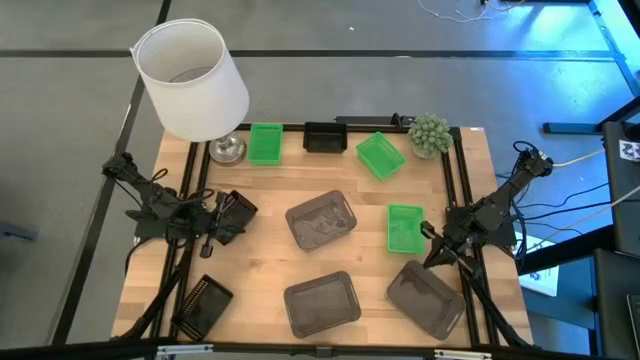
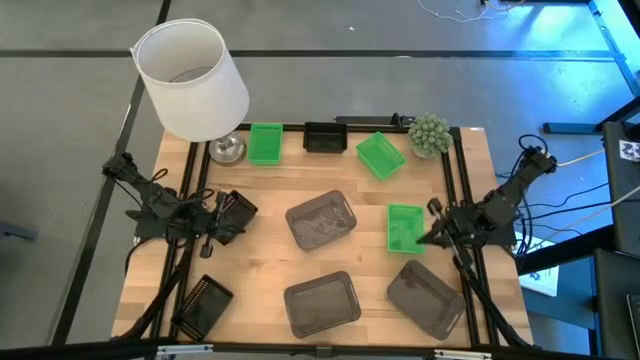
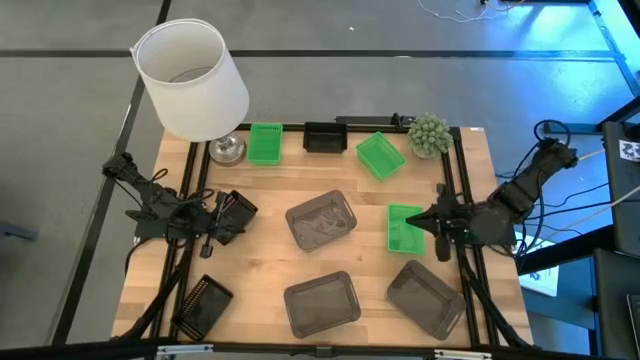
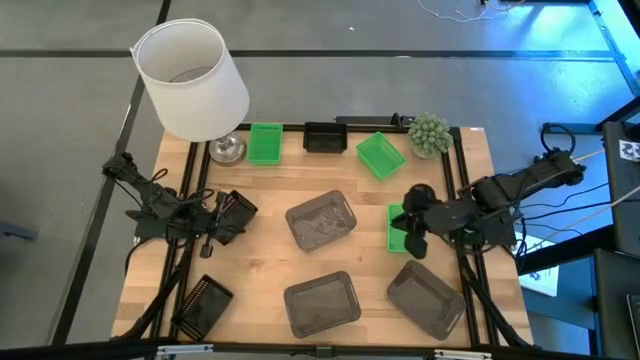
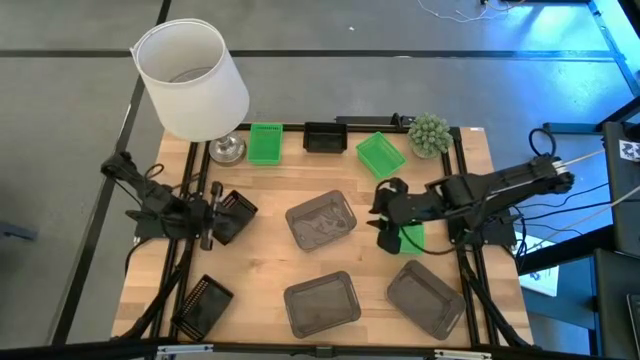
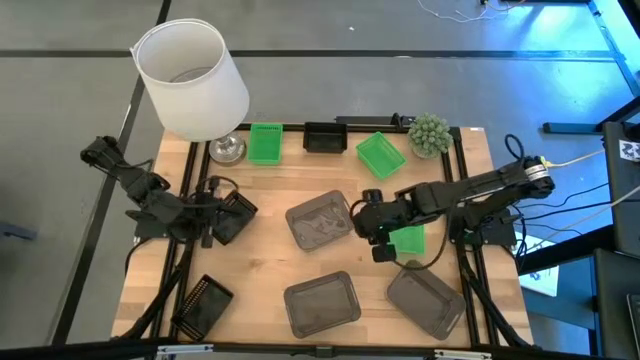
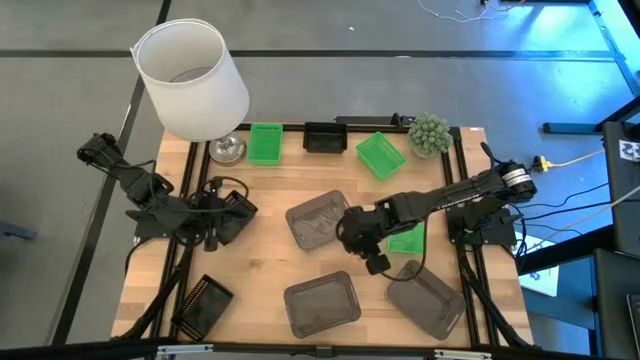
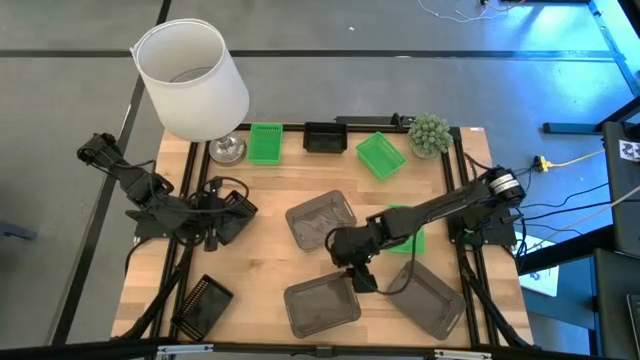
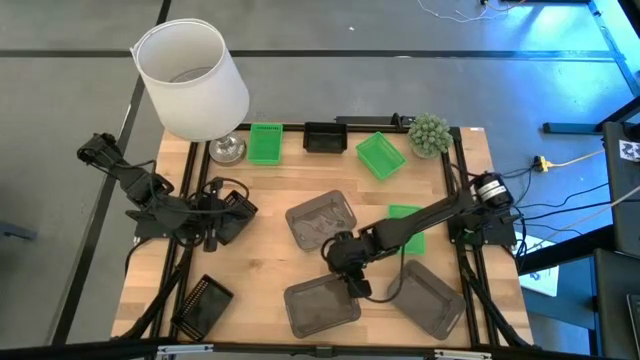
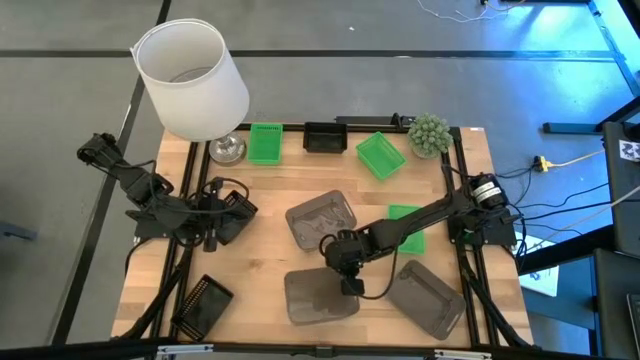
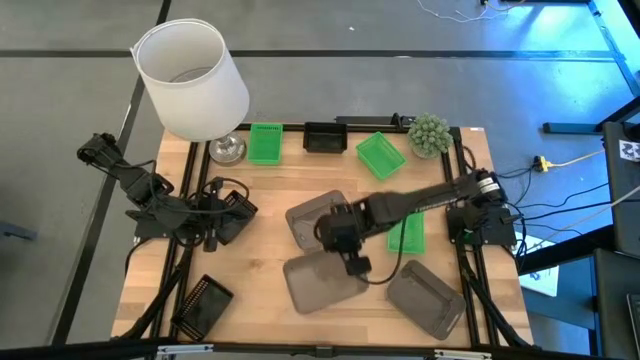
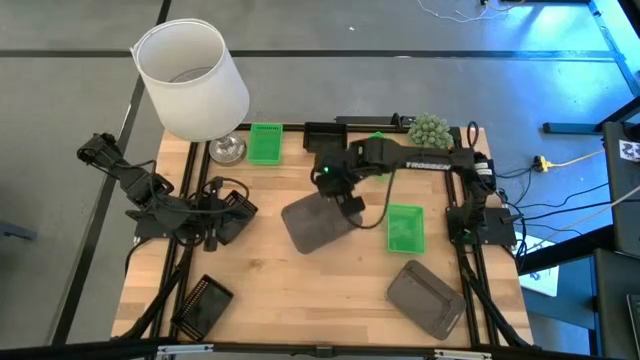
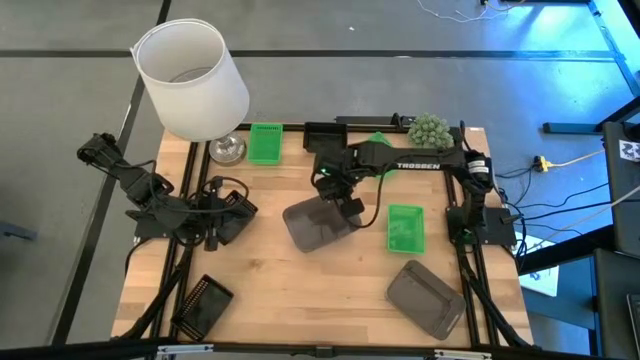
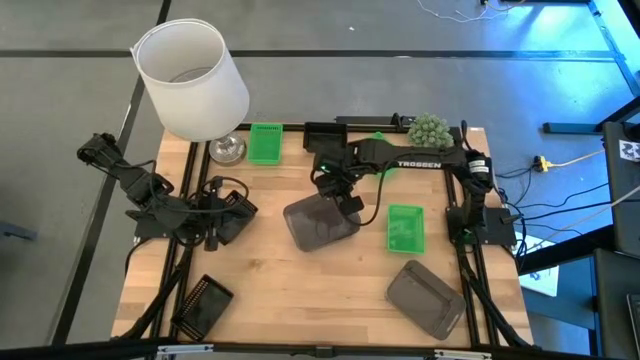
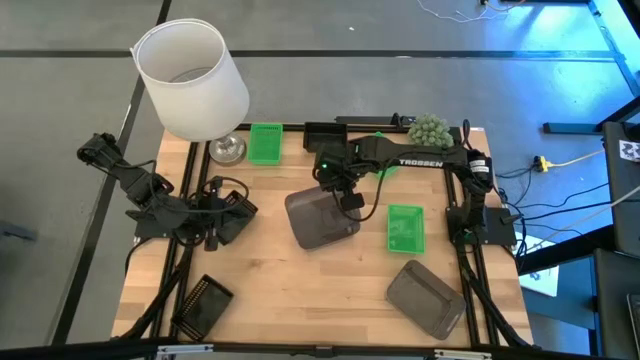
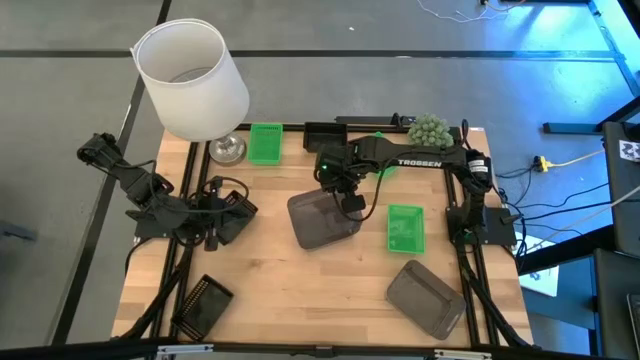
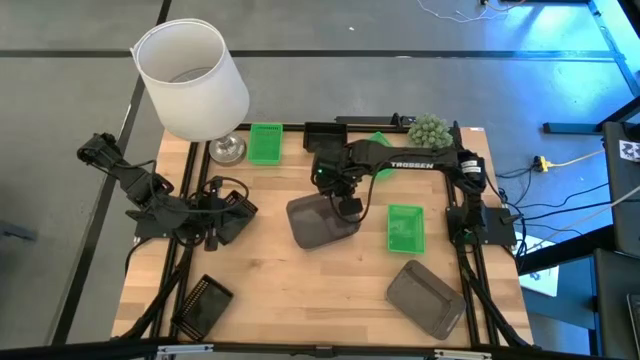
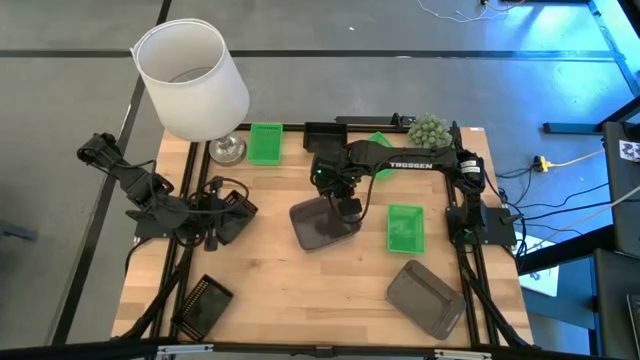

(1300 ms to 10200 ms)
Stack the middle transparent black bin on top of the top transparent black bin

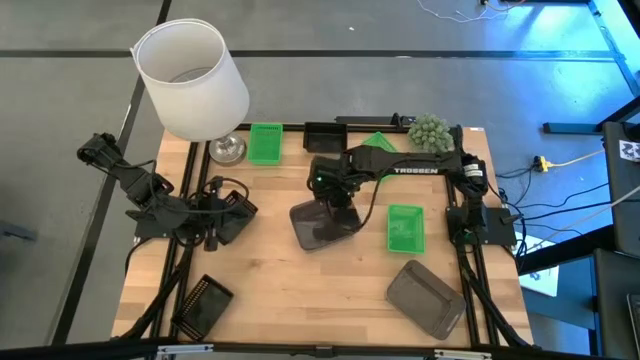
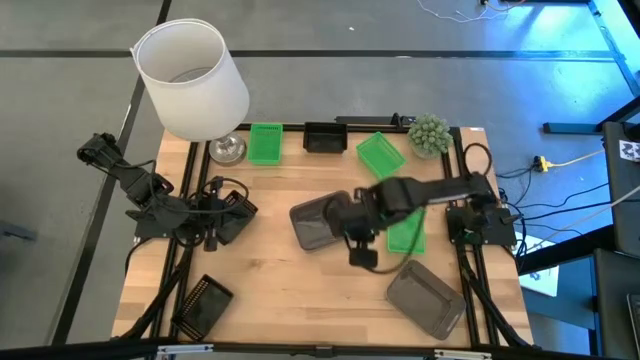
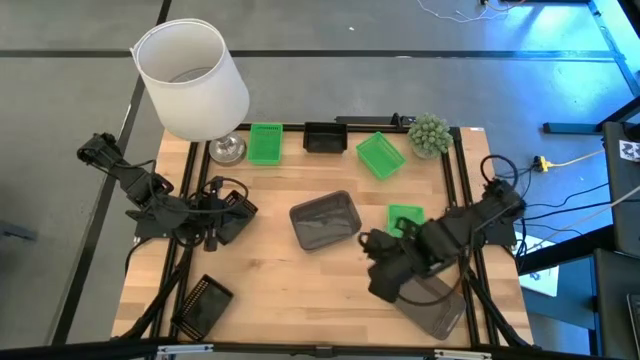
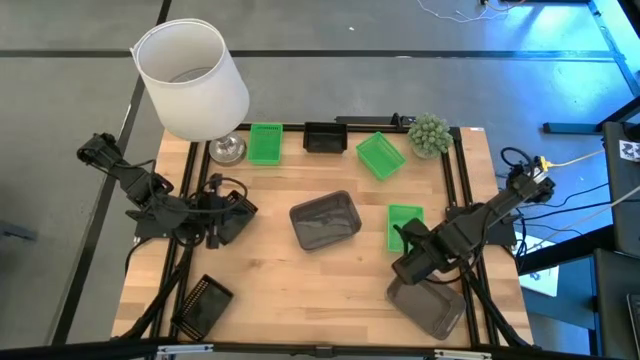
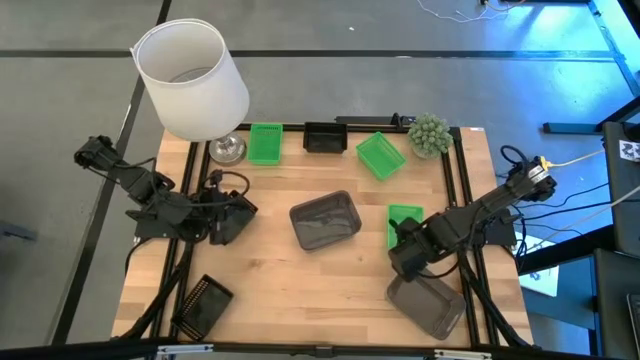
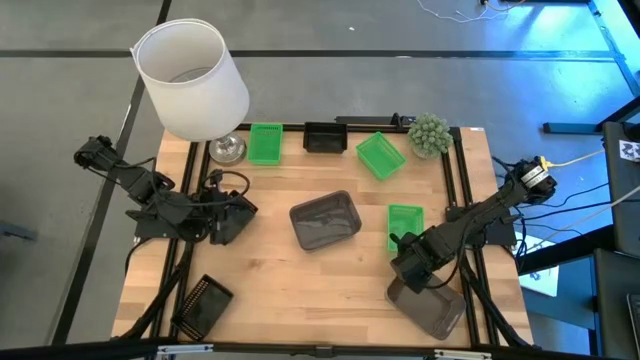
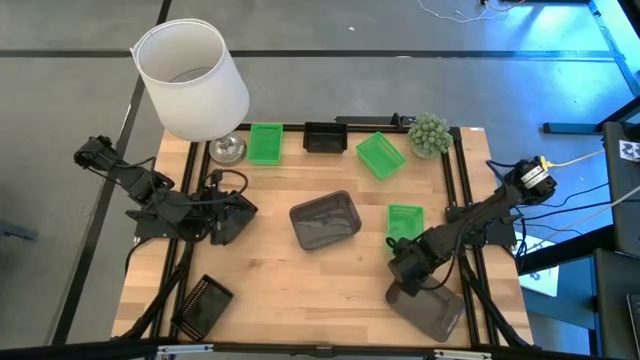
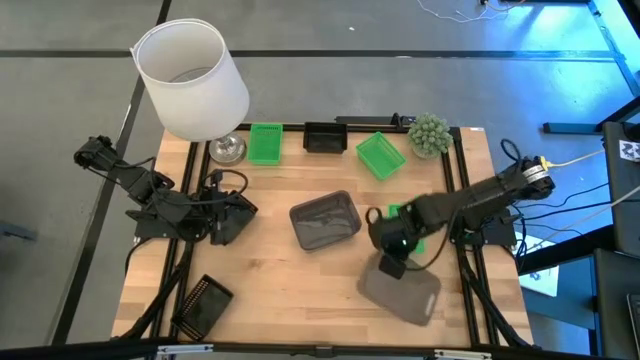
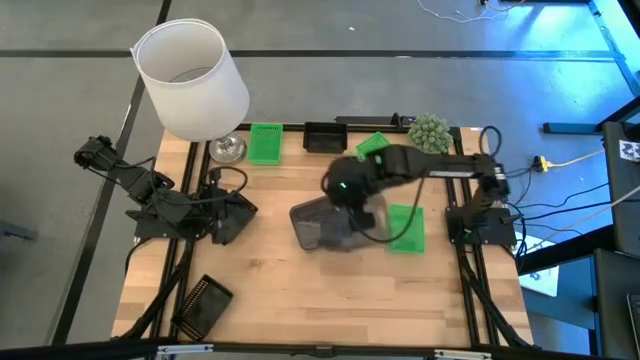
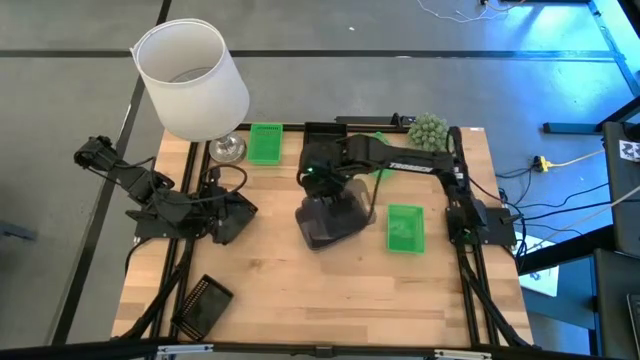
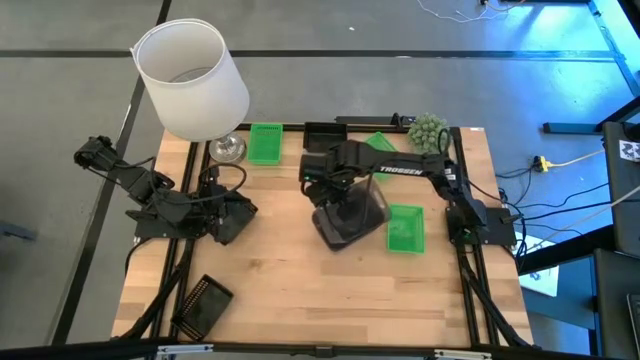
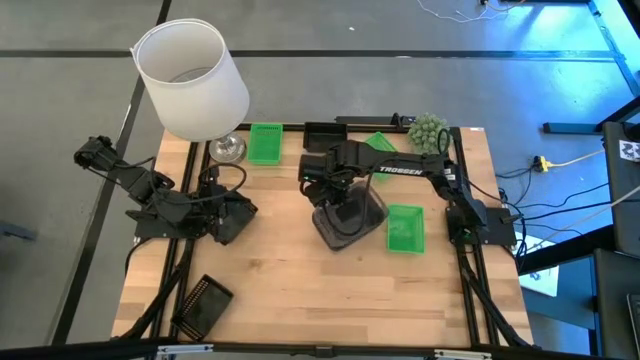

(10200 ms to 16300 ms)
Stack the right transparent black bin on top of the top transparent black bin

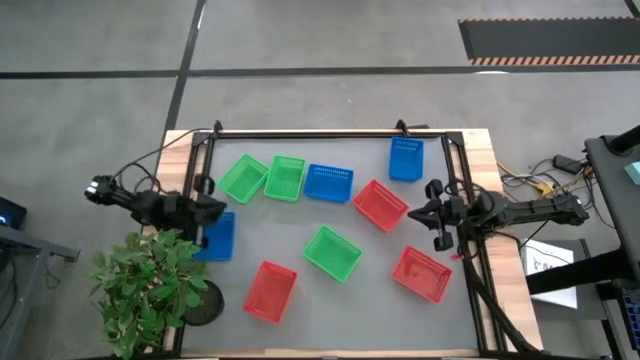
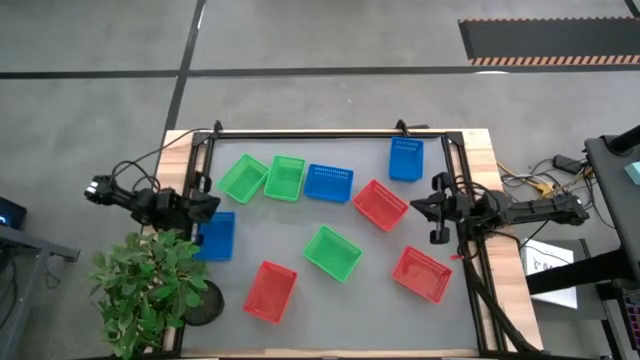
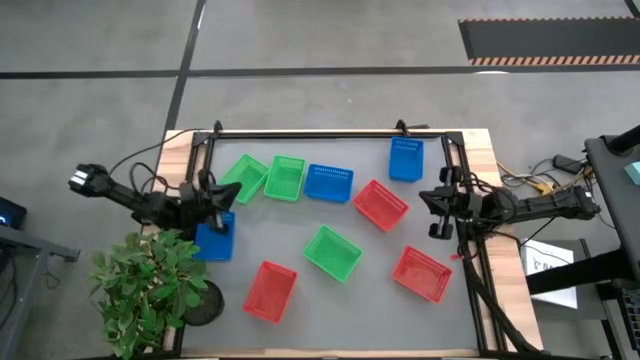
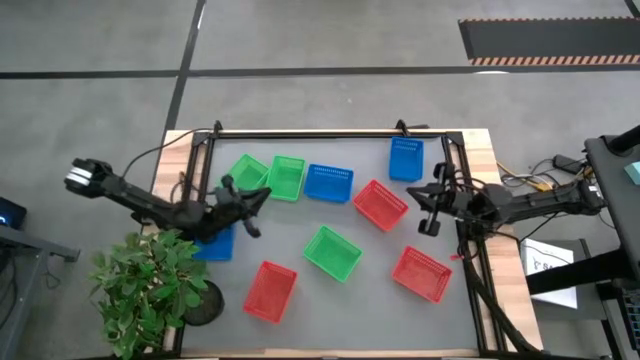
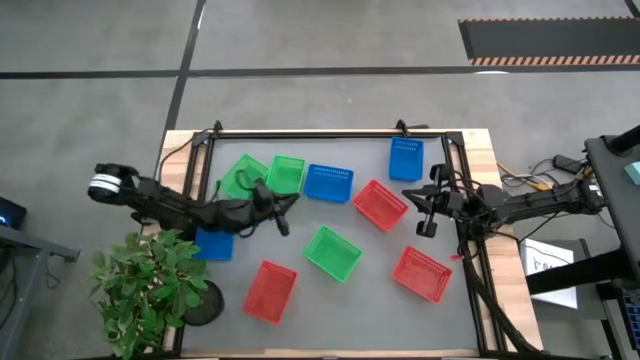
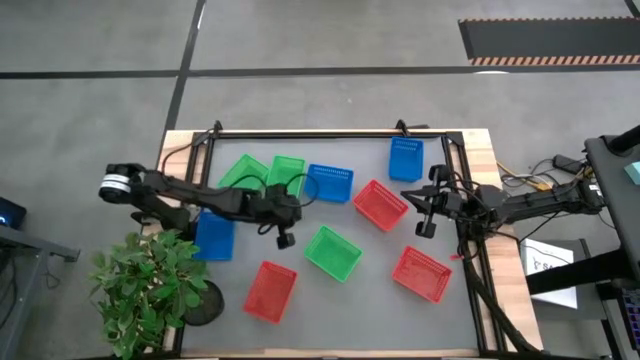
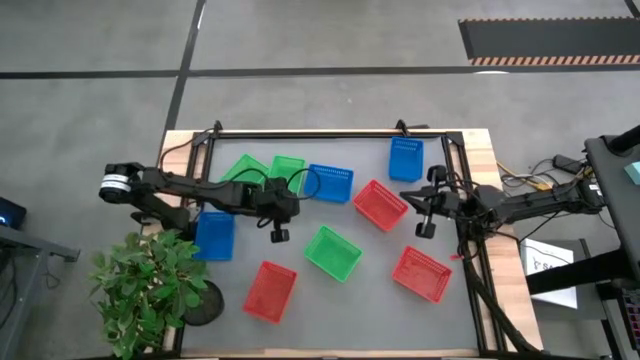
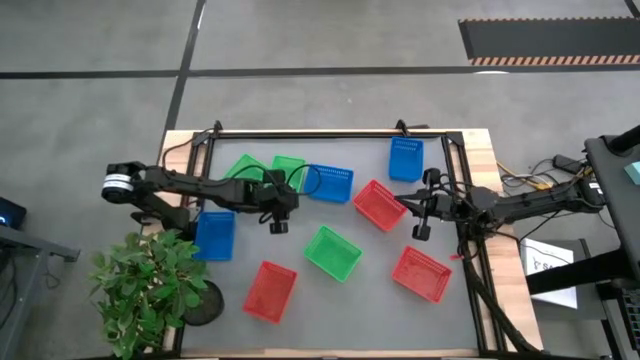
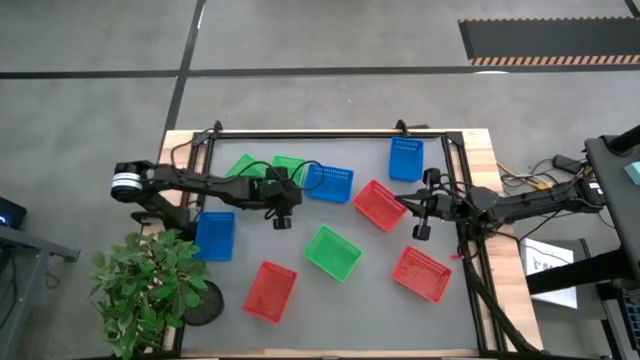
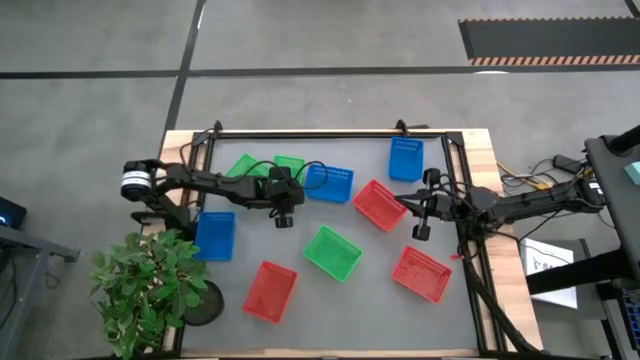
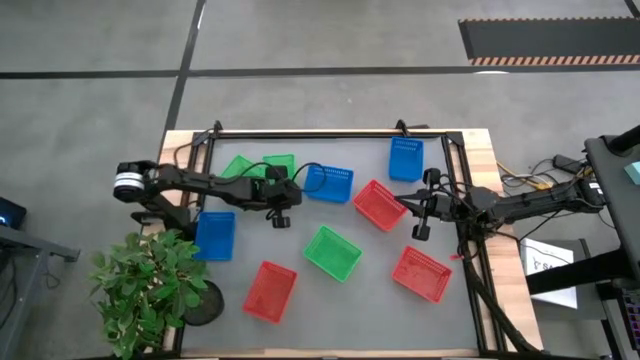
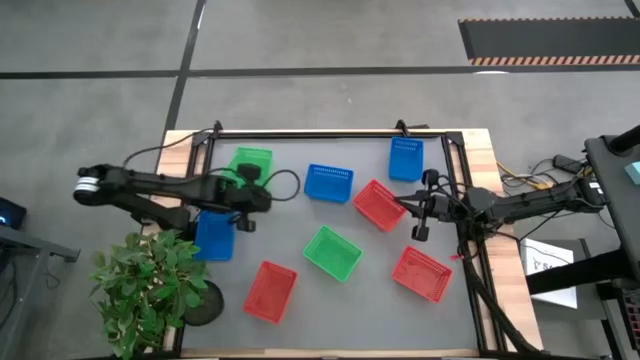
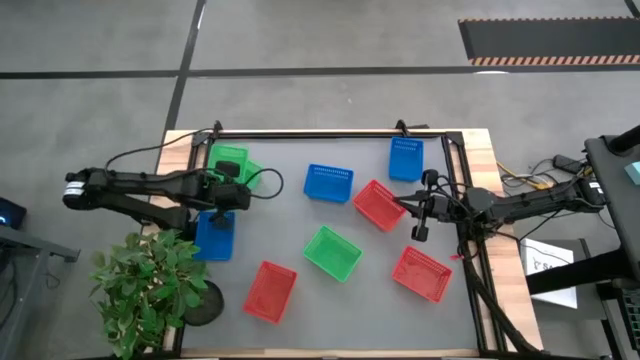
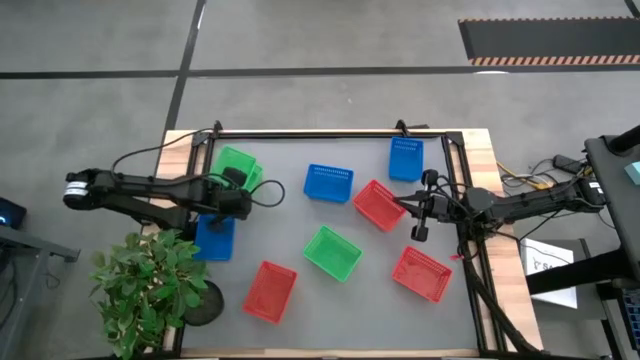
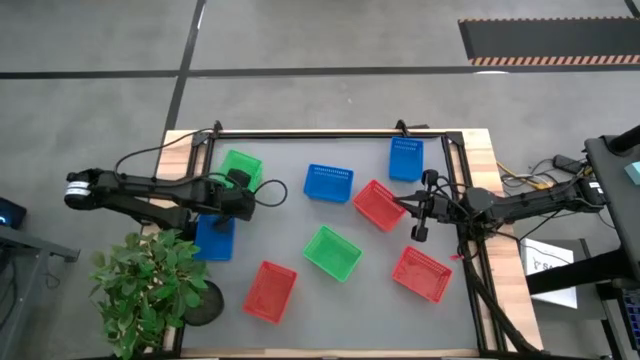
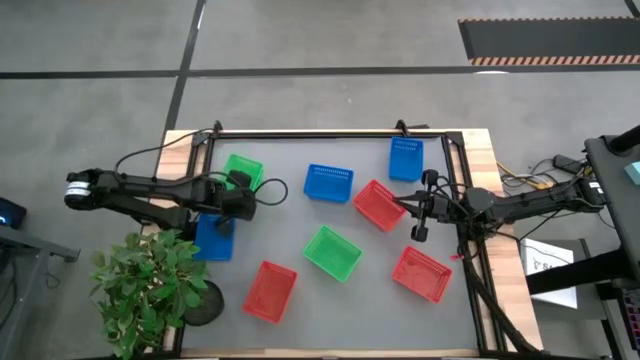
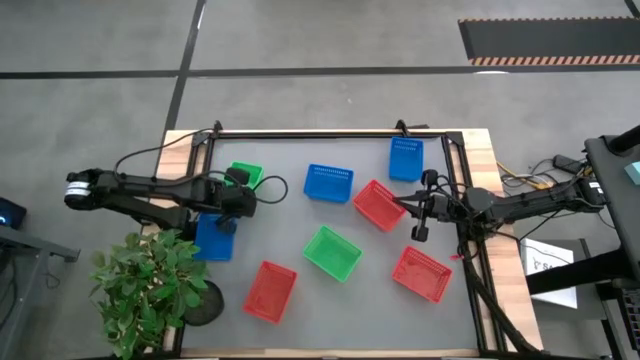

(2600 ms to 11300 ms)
Stack the top right green basket on the top left green basket
